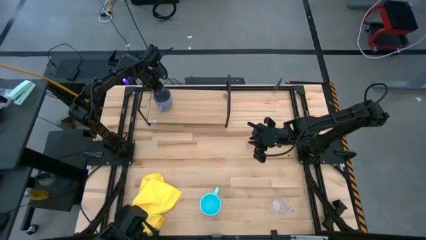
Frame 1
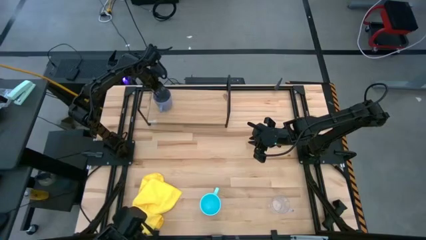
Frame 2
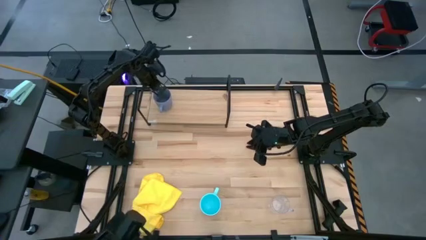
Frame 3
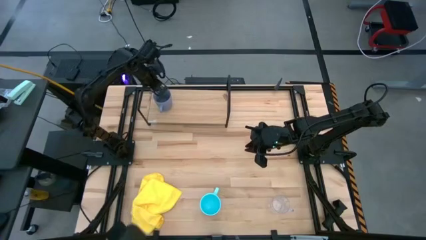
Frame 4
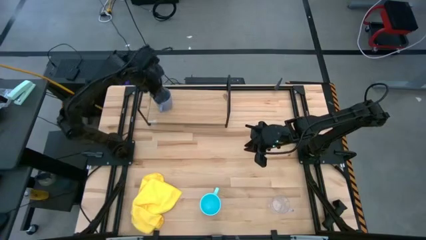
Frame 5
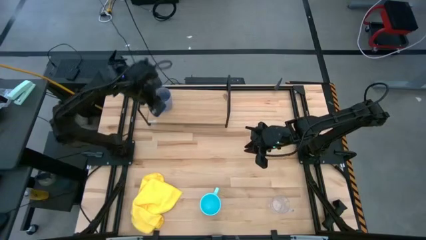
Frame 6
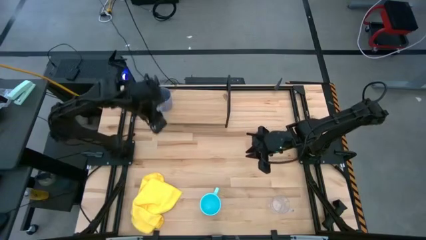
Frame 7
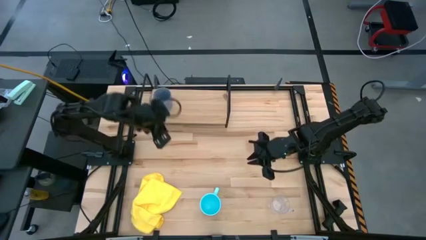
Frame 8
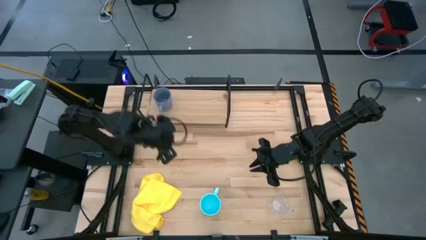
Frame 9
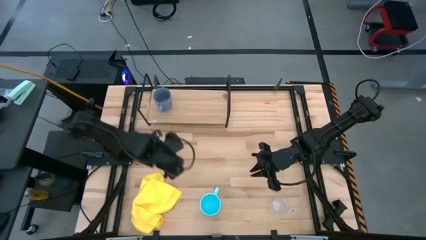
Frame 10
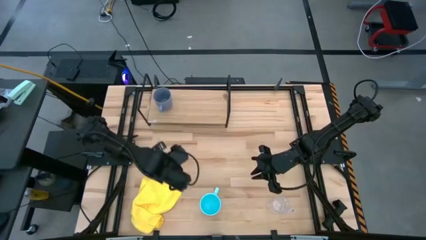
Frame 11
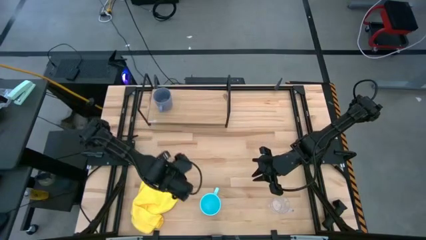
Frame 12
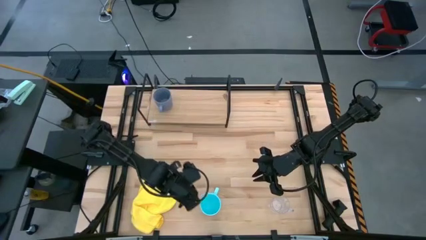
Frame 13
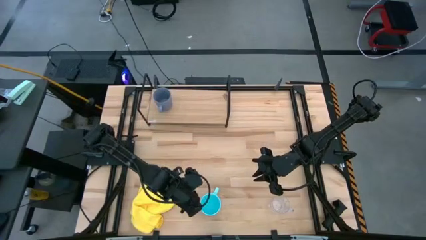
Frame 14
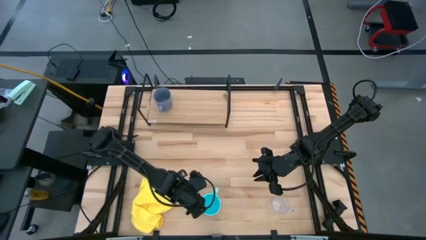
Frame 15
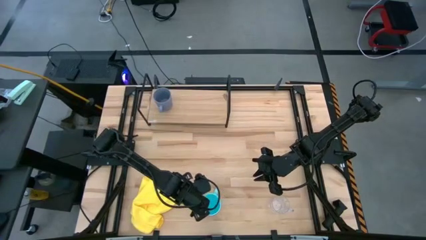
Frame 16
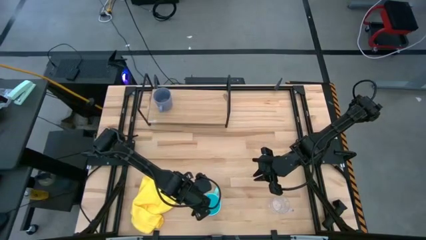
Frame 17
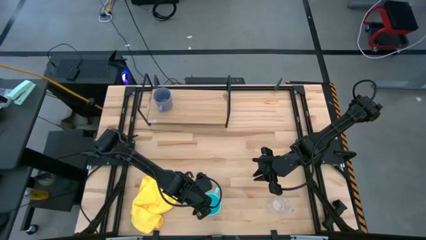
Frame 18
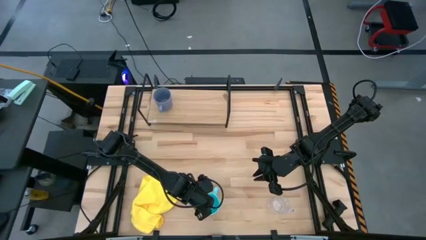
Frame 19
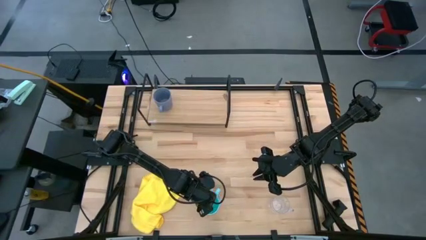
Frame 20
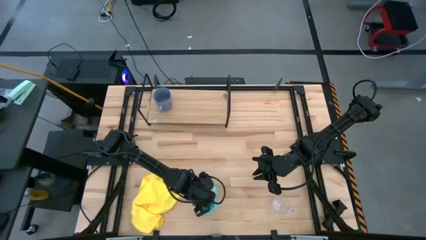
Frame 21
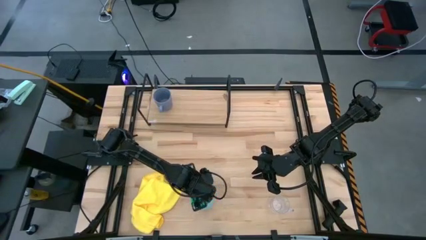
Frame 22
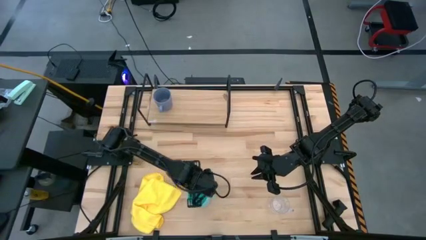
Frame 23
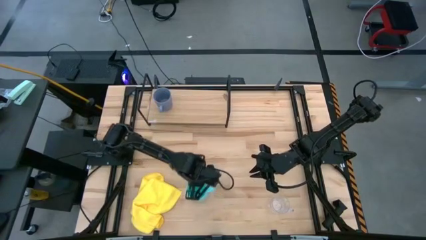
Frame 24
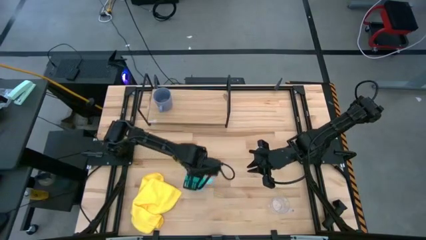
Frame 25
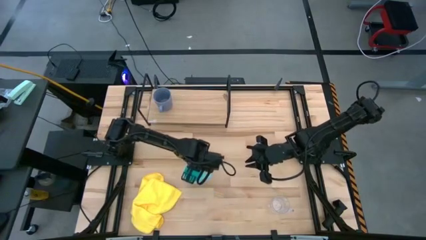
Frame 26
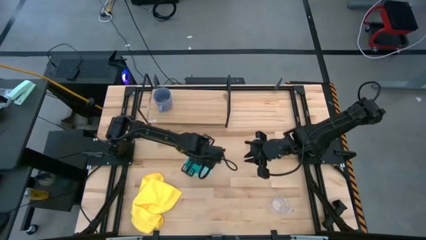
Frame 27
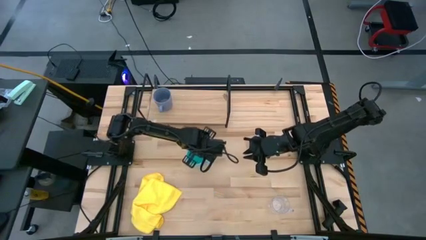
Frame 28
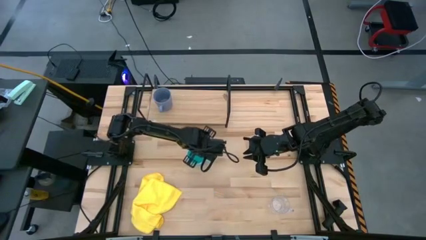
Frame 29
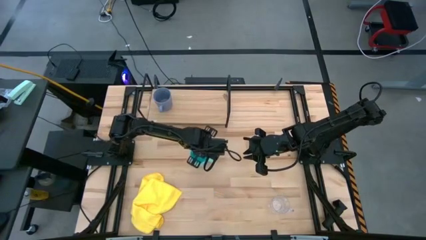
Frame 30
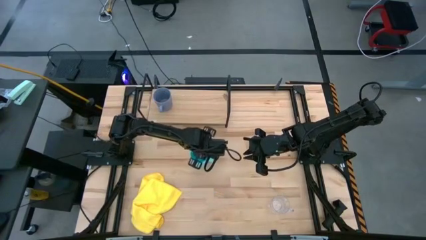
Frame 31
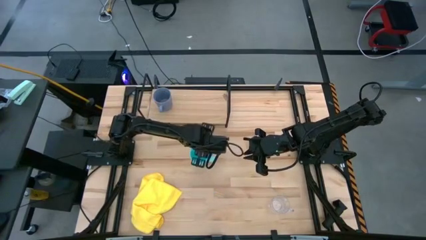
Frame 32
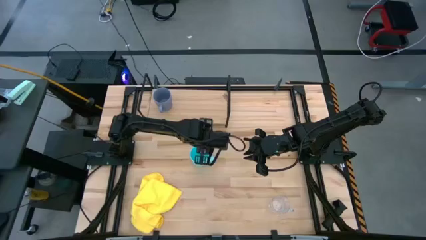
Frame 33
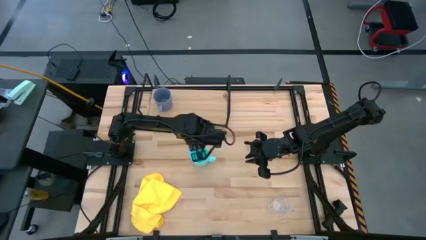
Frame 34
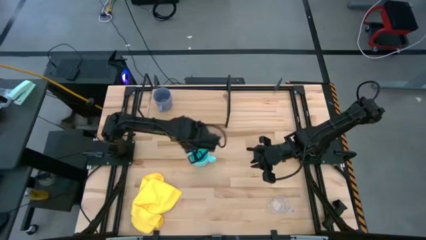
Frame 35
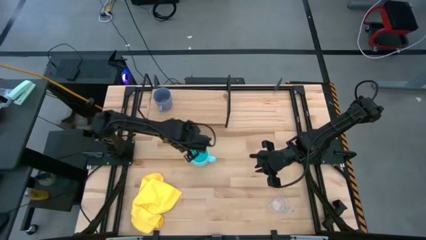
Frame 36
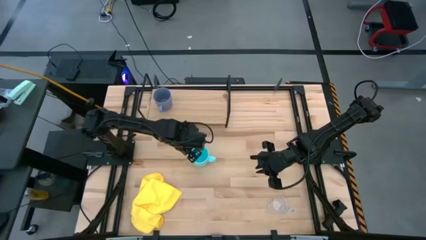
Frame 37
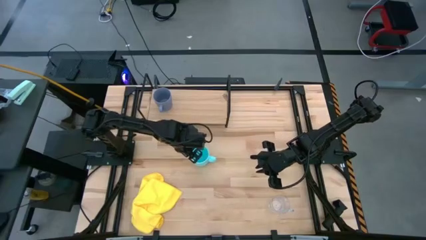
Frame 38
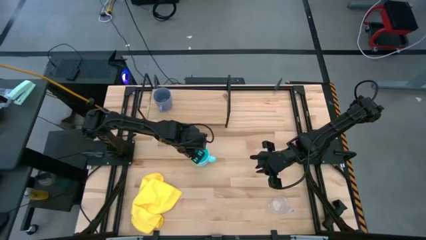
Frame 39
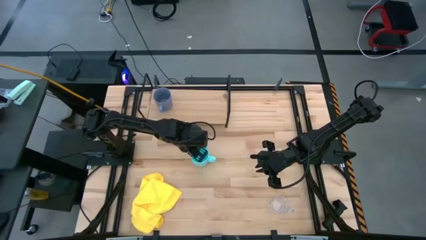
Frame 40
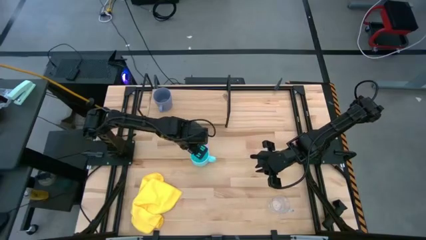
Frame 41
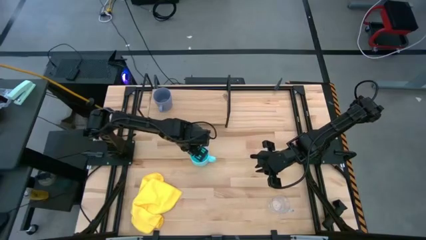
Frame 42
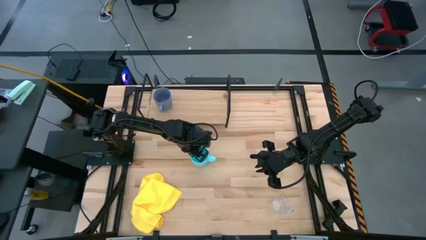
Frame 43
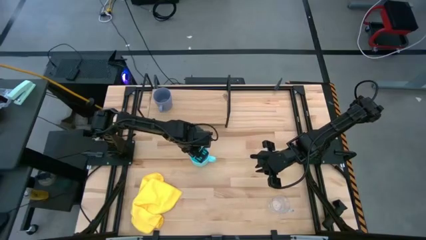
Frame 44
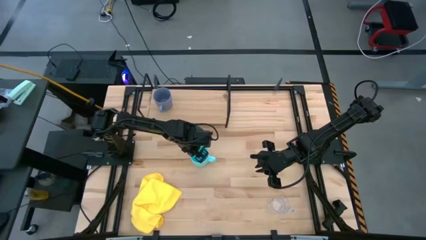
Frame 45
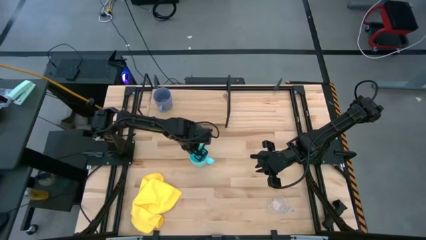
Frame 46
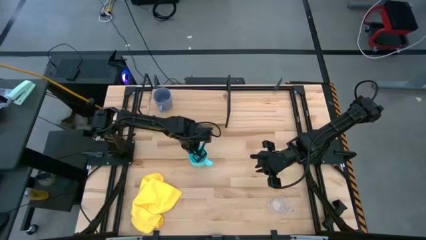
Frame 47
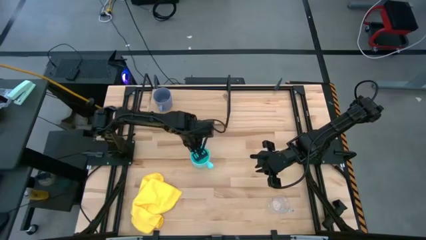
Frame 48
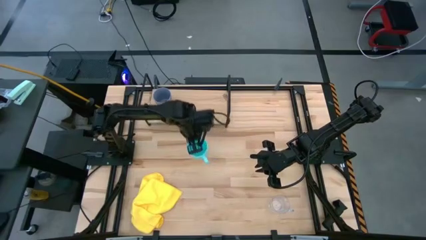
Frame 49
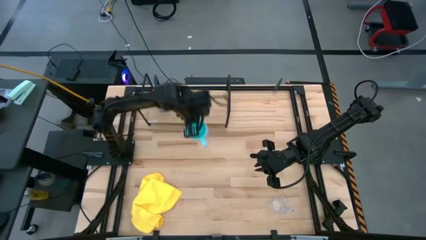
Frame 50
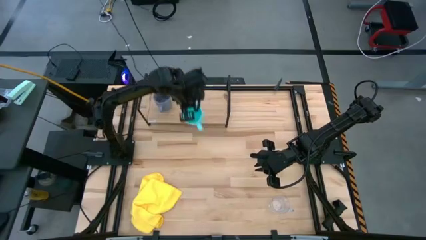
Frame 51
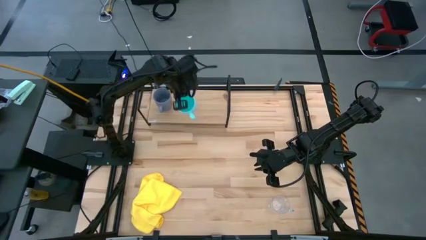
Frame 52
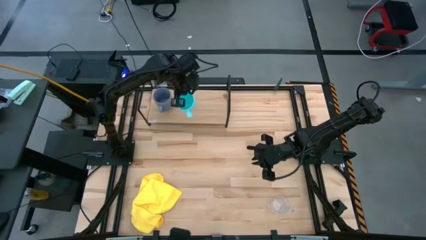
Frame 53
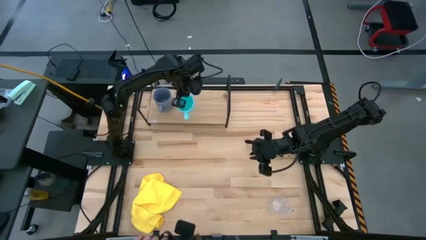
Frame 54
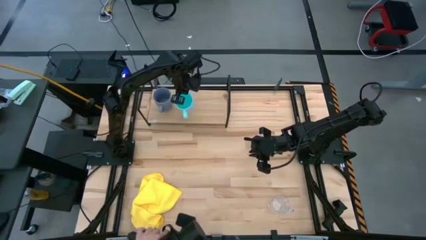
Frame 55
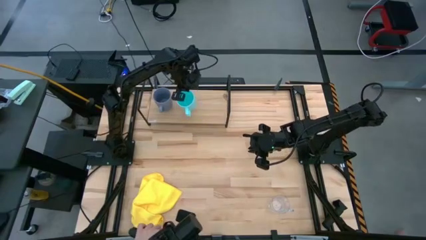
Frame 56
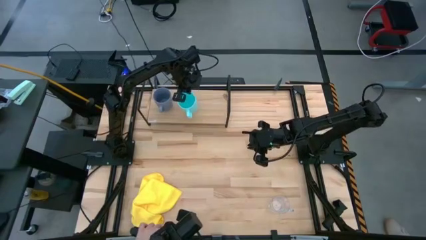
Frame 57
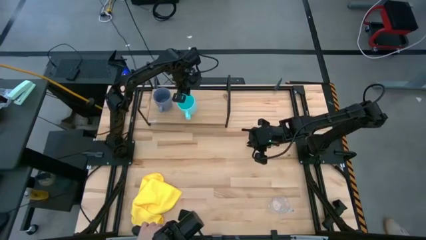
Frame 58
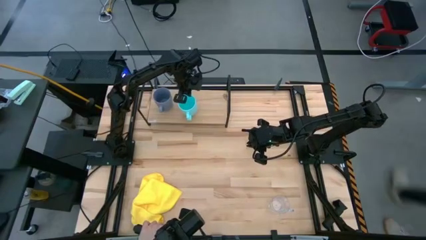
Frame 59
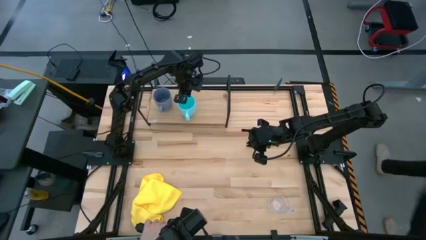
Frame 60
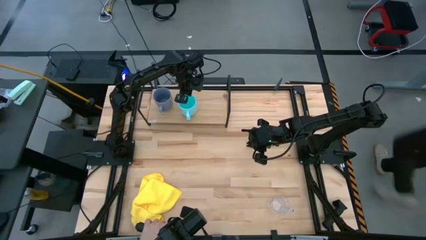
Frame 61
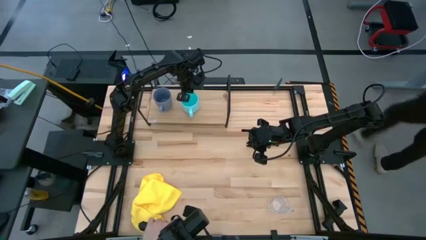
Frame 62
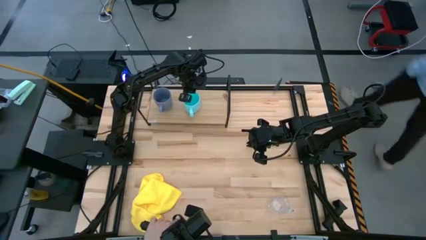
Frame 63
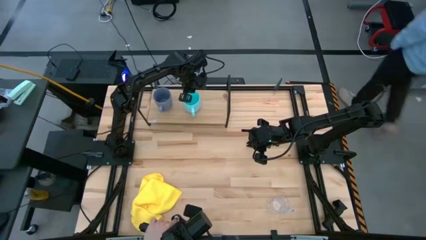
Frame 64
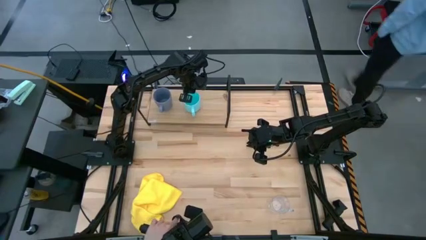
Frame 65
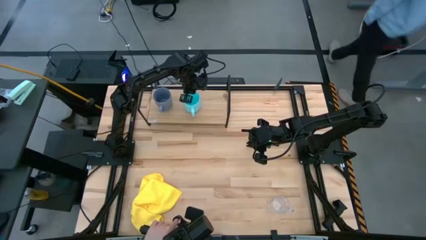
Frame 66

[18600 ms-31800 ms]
Task: Stack small to large cups/mugs on shelf
Put the light blue mug on the shelf
